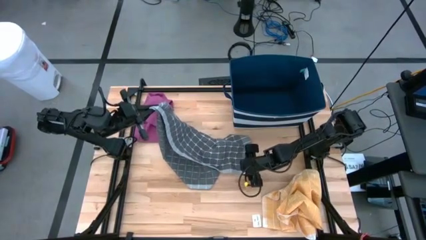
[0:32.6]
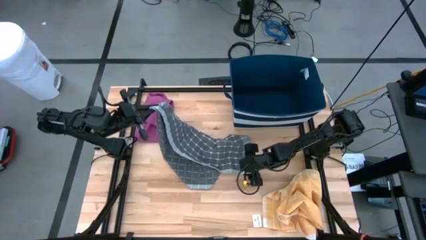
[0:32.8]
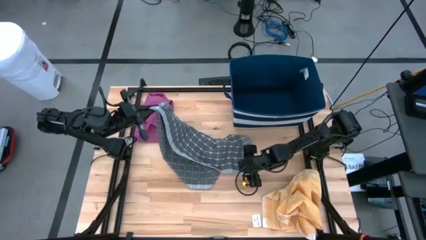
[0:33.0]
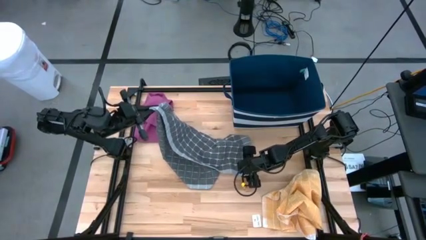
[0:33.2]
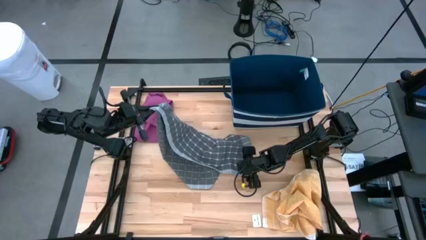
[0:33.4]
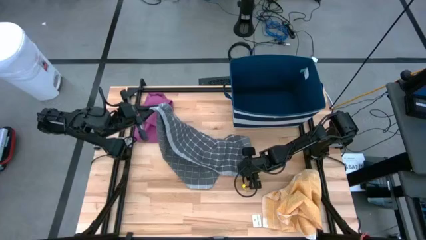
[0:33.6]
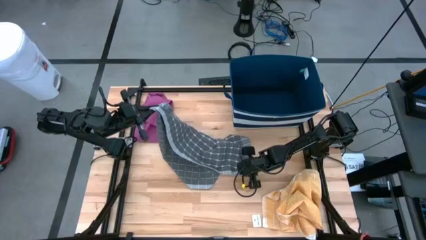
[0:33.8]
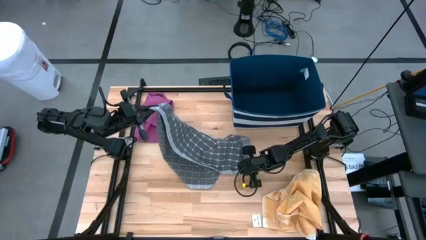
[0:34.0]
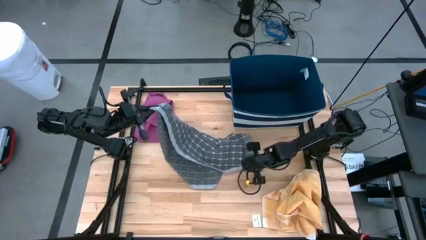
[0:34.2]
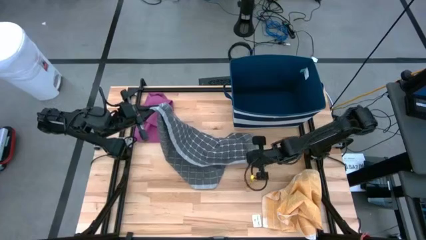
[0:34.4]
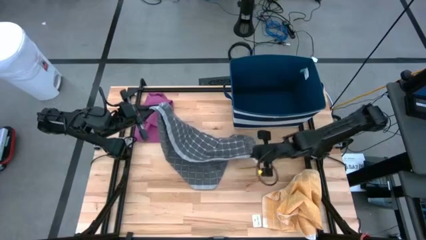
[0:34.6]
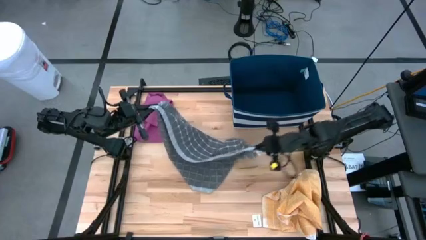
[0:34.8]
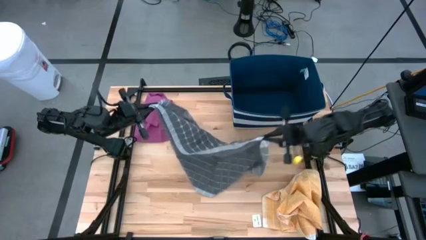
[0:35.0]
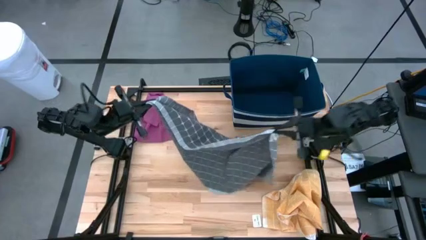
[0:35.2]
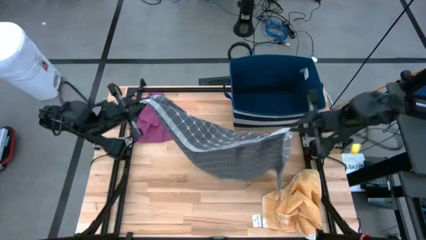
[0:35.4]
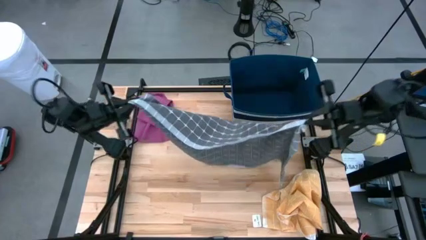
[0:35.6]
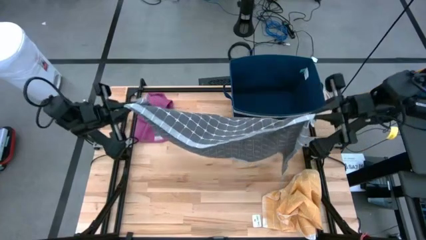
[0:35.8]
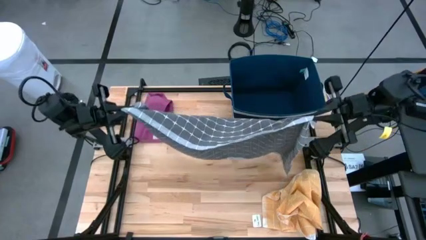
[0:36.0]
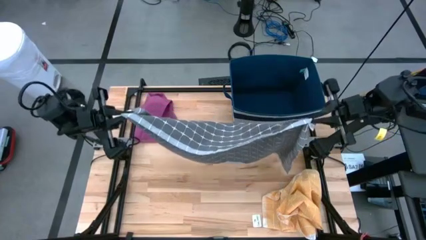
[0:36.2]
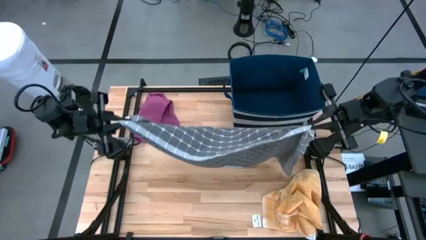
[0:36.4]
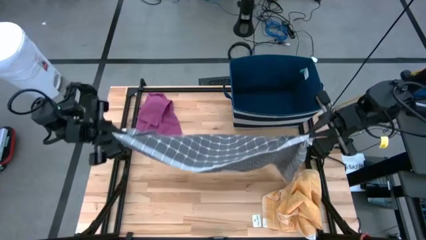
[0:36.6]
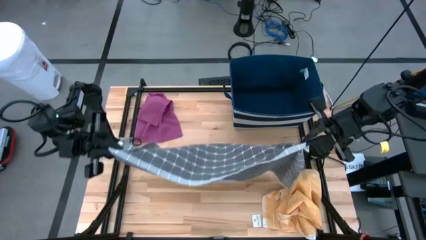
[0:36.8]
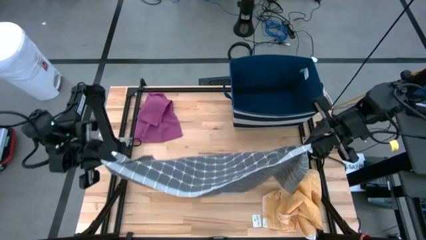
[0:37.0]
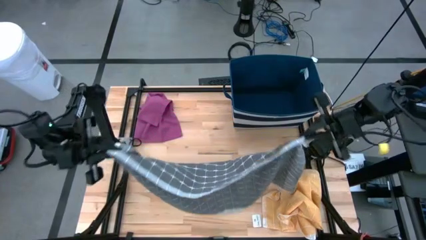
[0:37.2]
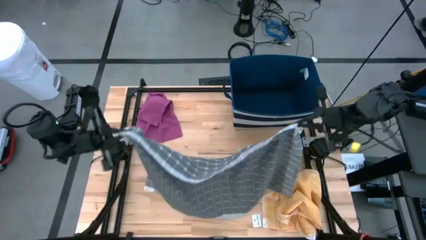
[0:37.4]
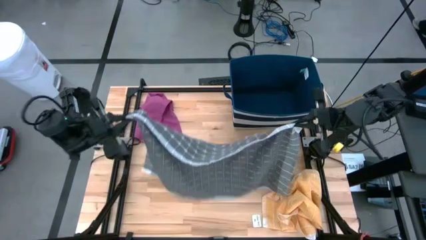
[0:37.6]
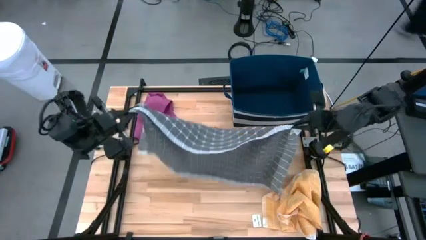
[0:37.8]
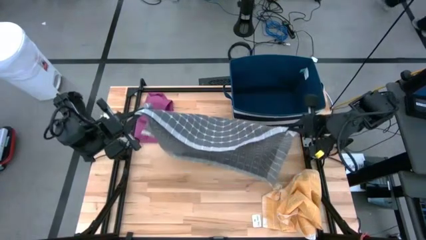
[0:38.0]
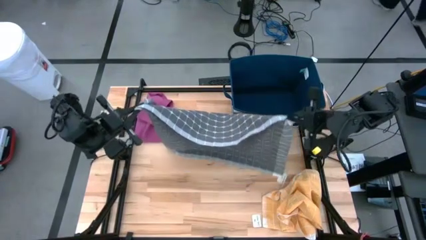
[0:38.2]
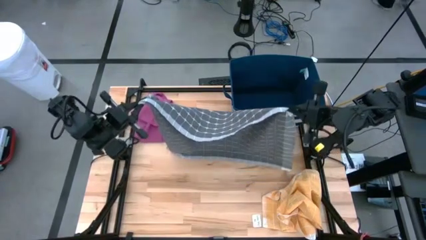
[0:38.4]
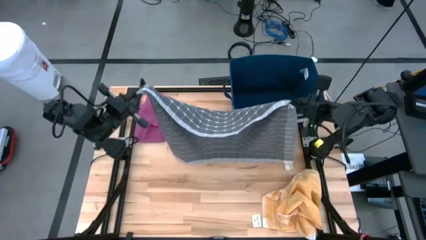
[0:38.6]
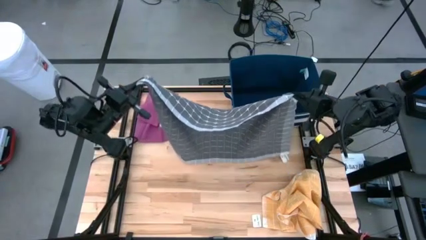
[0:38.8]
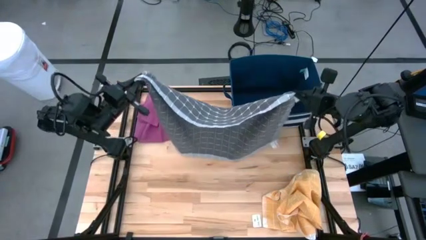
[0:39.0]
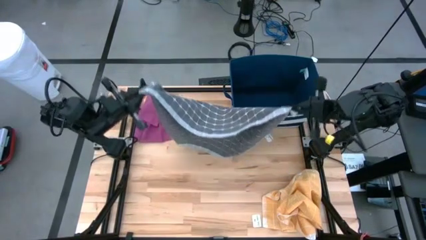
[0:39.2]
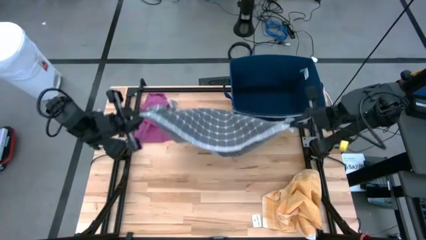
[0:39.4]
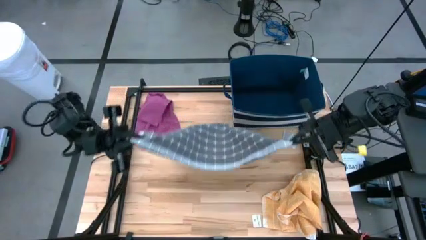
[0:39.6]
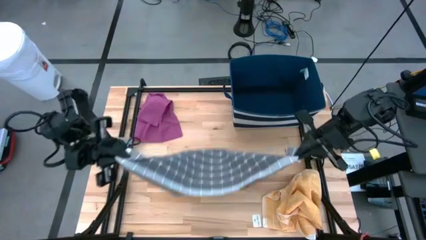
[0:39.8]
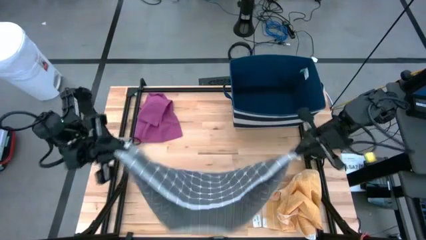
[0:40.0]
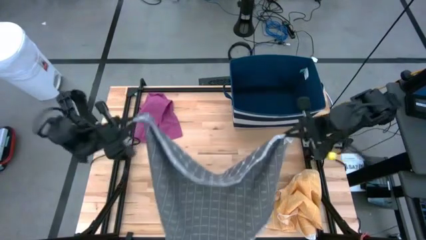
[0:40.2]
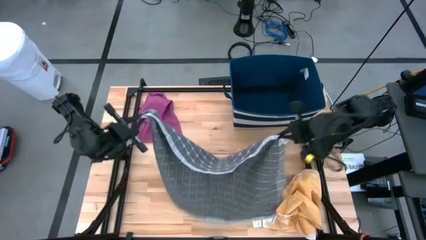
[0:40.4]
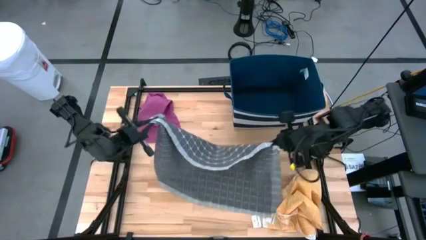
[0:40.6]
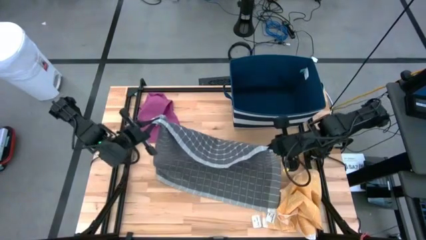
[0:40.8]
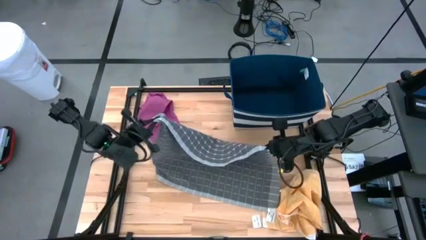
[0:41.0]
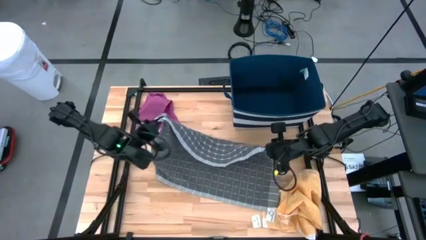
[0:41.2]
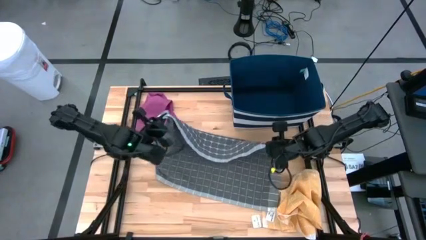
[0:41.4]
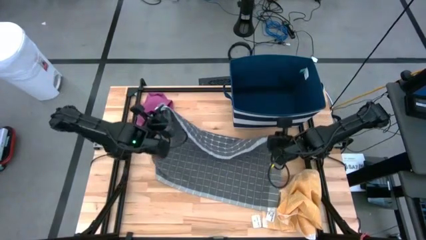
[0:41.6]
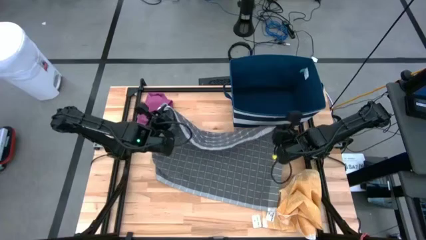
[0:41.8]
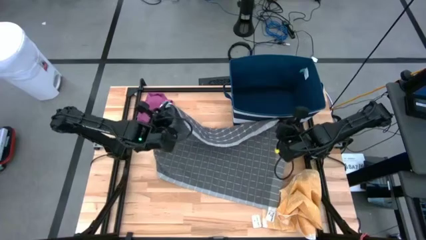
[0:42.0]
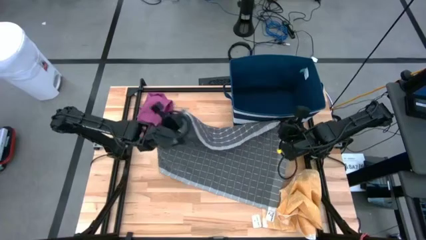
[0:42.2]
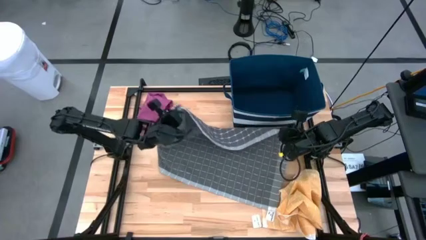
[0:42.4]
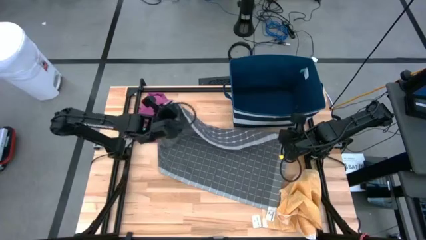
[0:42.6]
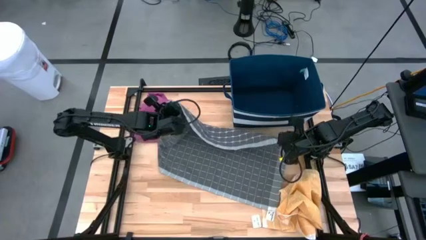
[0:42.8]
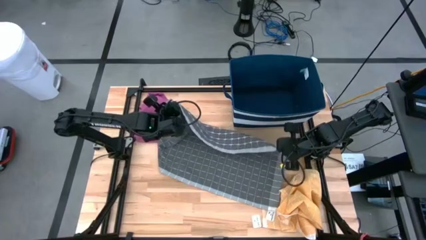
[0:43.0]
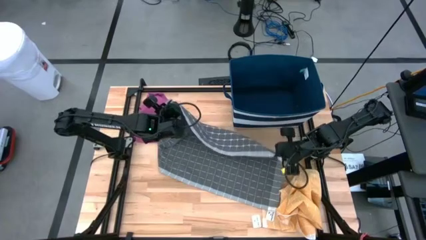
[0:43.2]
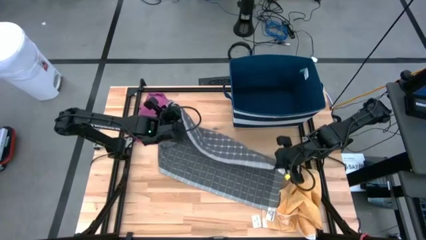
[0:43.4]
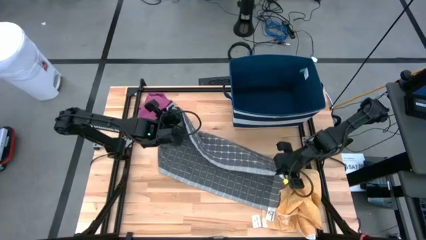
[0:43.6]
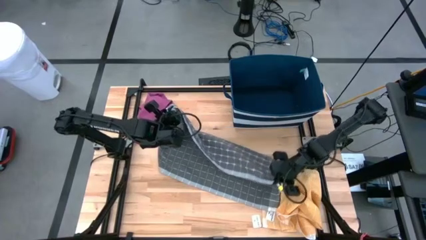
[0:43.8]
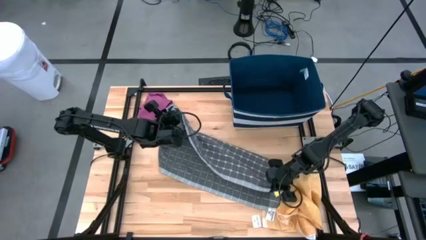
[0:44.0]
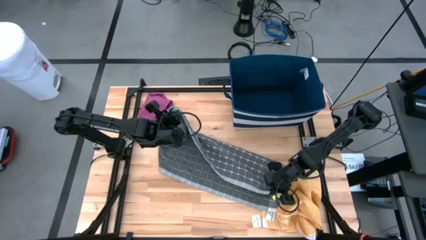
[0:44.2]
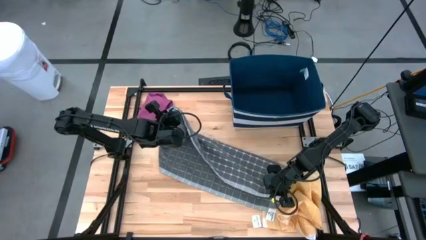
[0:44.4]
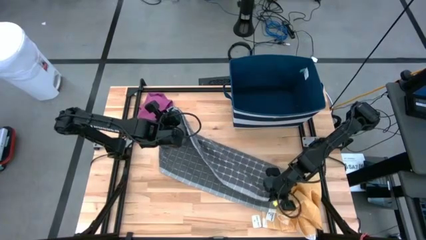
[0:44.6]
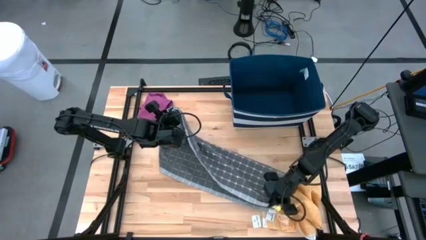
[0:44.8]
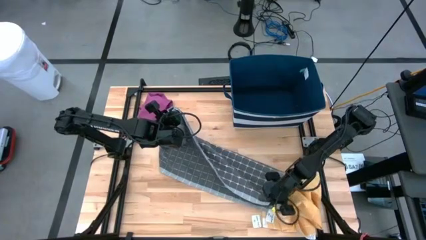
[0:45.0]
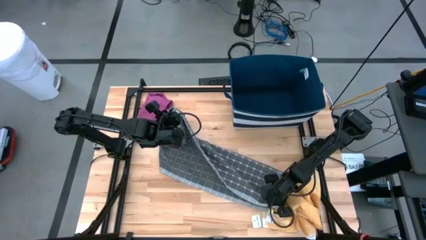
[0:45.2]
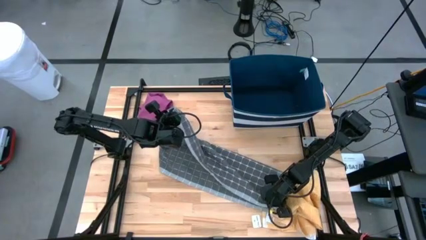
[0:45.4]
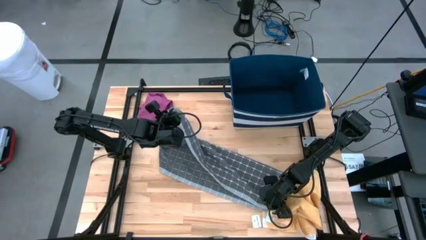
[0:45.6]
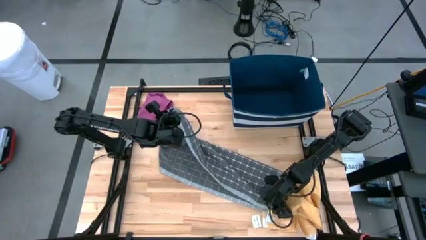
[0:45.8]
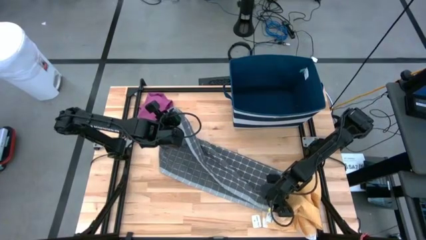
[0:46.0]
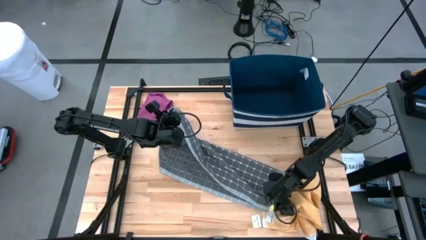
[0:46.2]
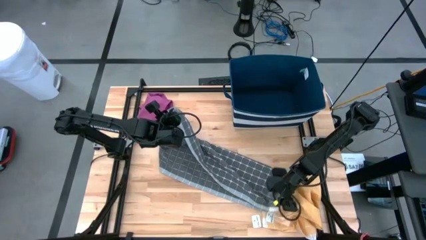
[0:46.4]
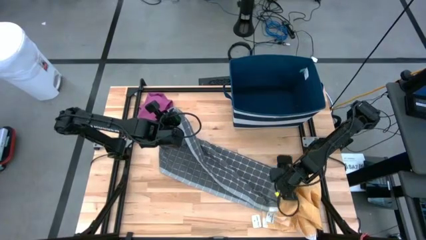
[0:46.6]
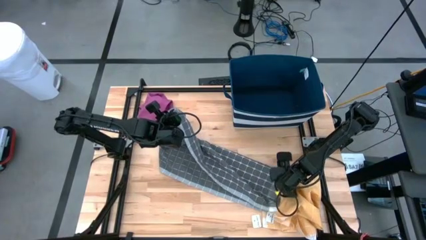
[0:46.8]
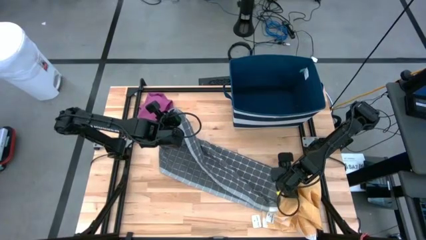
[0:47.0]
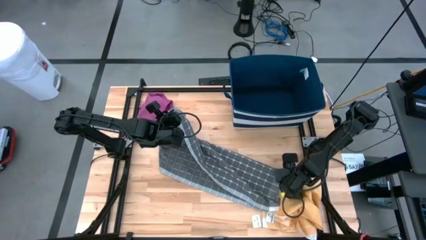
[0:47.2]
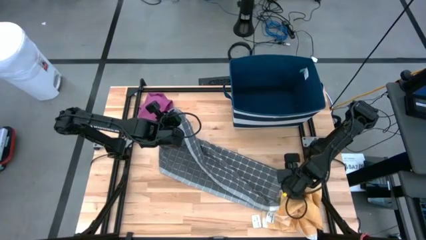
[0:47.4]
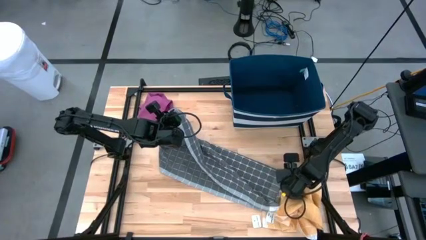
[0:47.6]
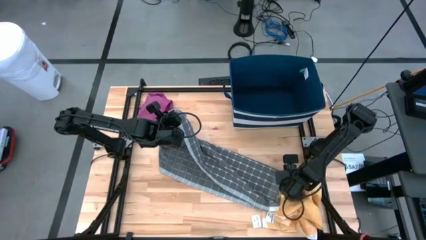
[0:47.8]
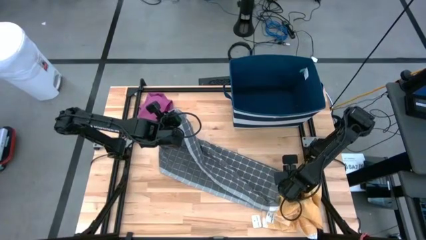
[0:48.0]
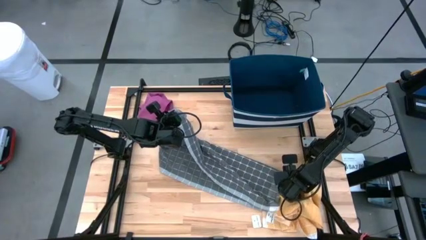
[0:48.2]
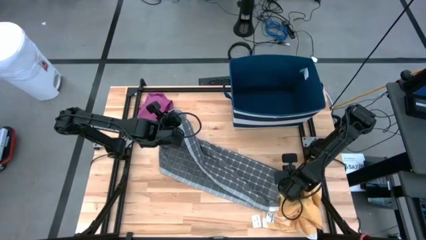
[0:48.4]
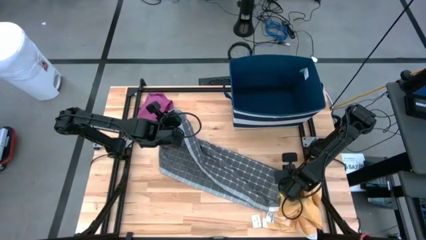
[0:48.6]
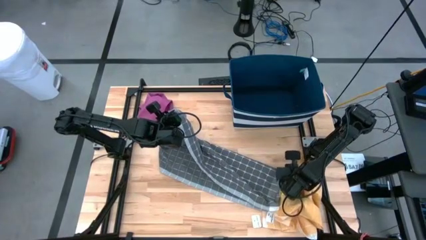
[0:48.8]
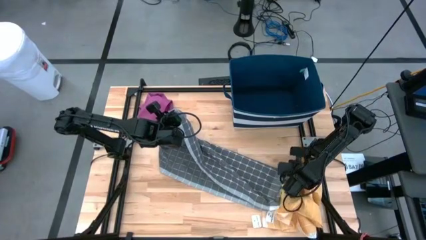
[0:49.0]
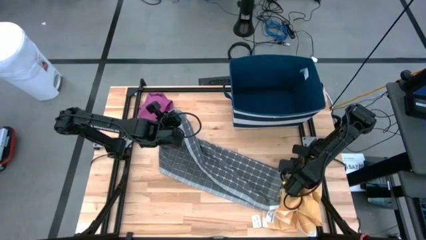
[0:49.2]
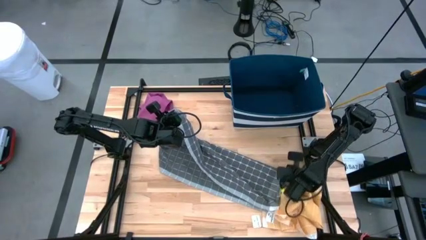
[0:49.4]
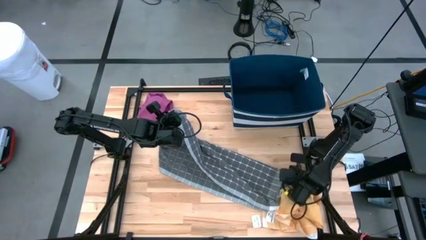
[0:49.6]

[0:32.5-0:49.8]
Task: Fold towel
Fold the gray checkered towel
